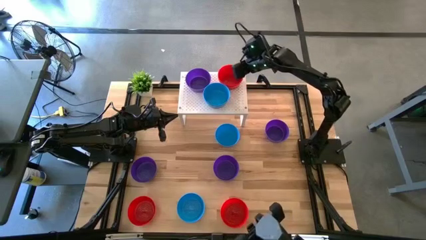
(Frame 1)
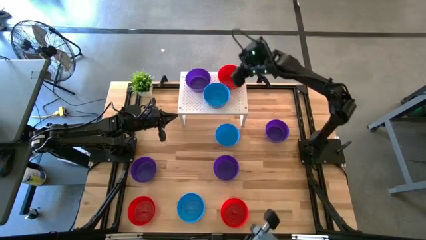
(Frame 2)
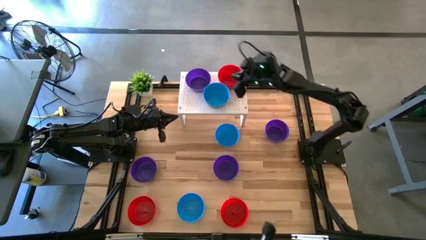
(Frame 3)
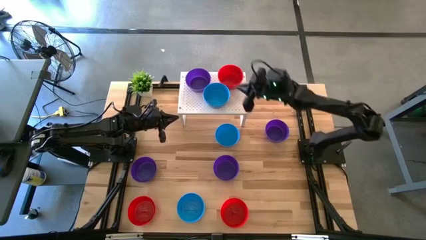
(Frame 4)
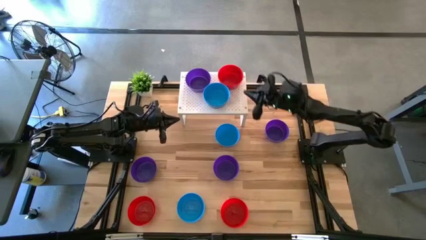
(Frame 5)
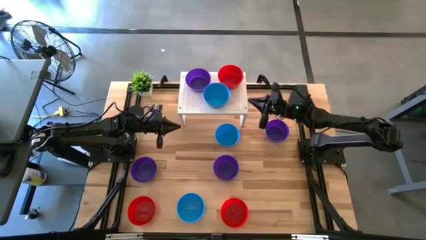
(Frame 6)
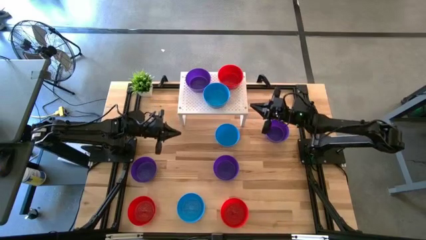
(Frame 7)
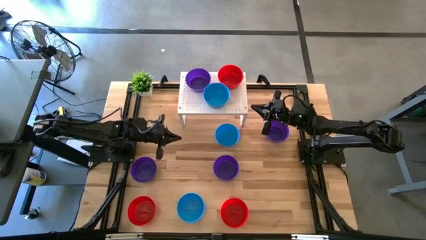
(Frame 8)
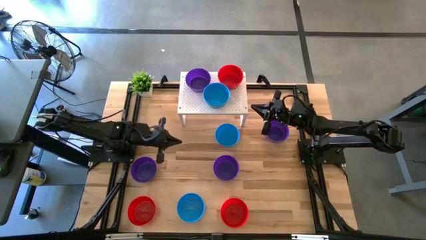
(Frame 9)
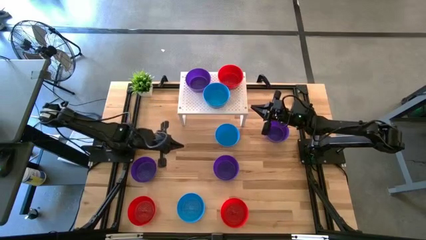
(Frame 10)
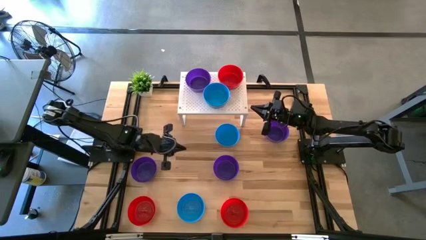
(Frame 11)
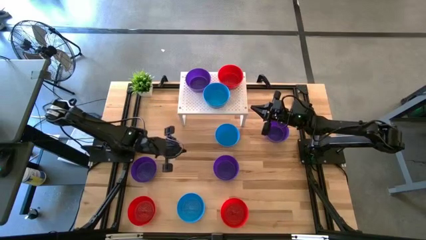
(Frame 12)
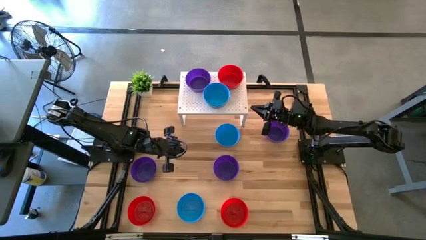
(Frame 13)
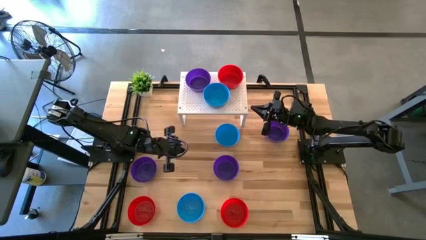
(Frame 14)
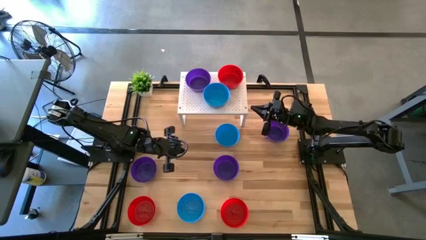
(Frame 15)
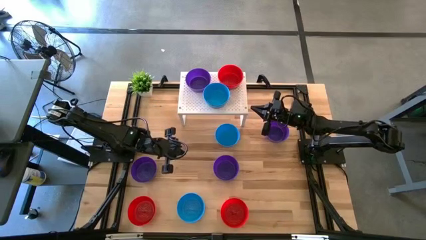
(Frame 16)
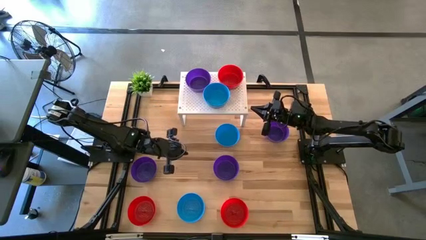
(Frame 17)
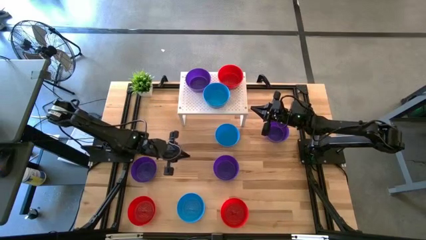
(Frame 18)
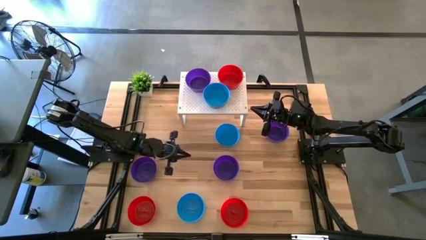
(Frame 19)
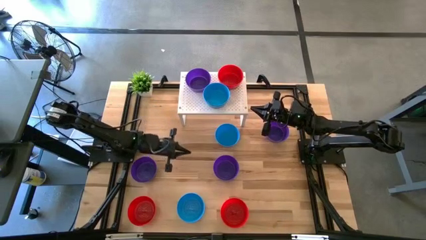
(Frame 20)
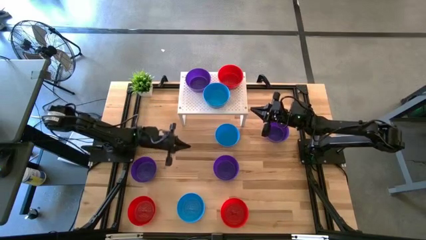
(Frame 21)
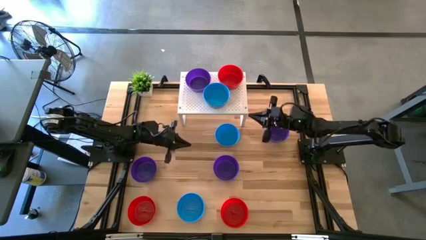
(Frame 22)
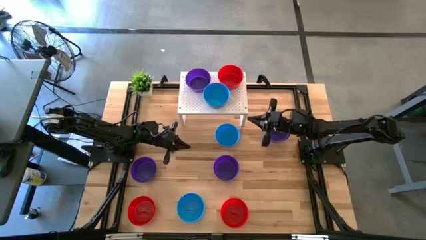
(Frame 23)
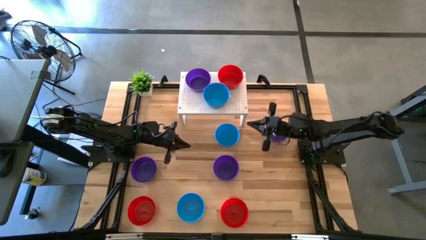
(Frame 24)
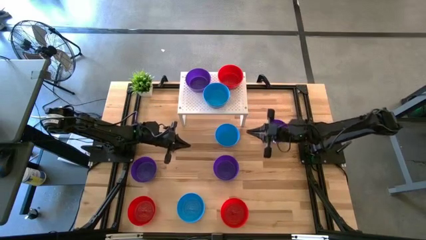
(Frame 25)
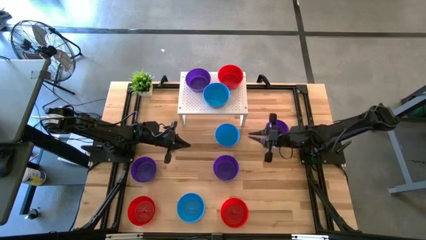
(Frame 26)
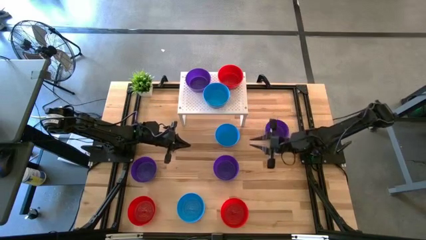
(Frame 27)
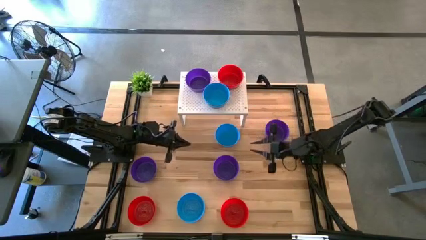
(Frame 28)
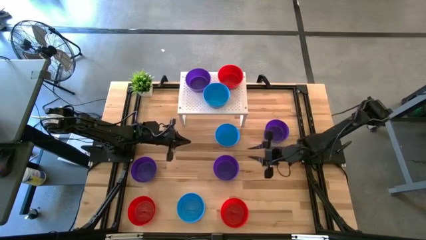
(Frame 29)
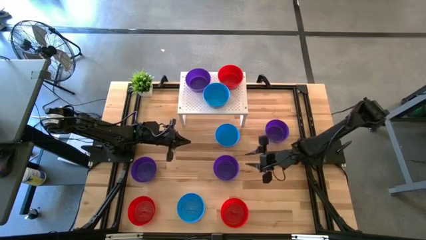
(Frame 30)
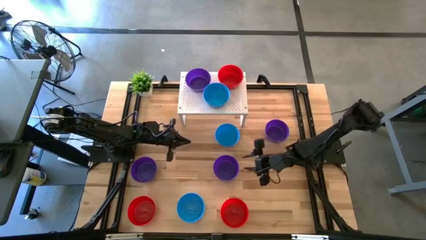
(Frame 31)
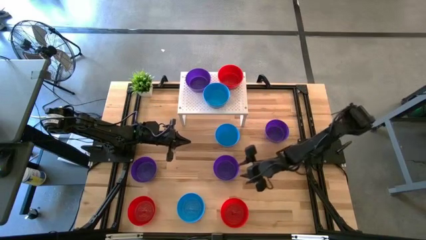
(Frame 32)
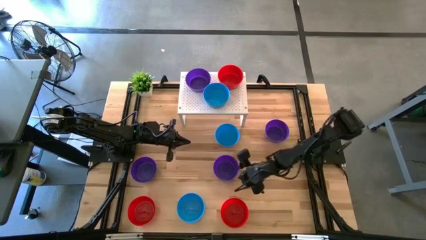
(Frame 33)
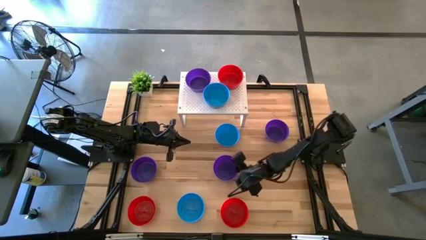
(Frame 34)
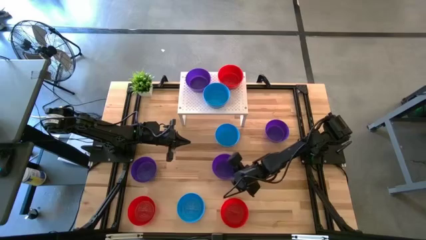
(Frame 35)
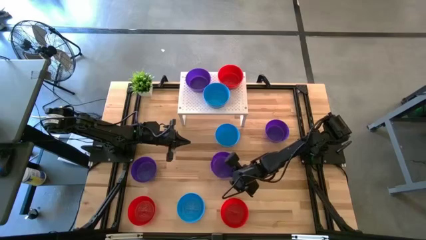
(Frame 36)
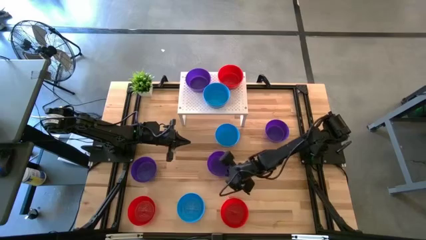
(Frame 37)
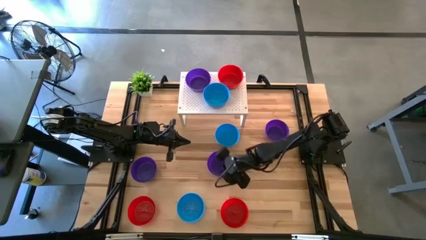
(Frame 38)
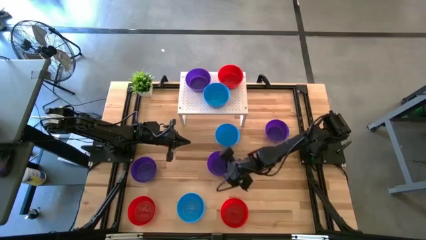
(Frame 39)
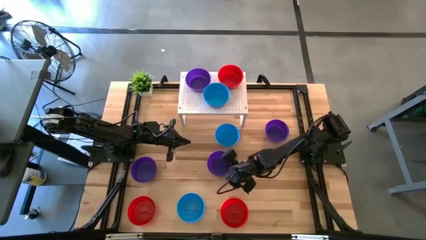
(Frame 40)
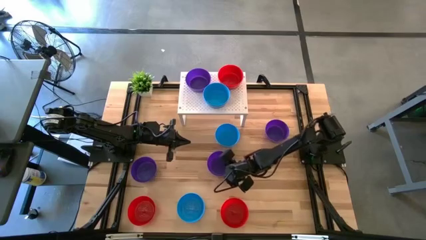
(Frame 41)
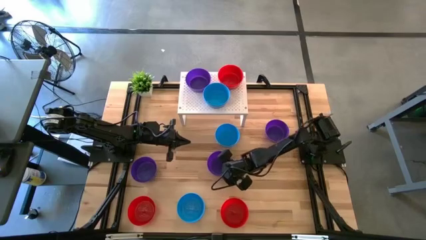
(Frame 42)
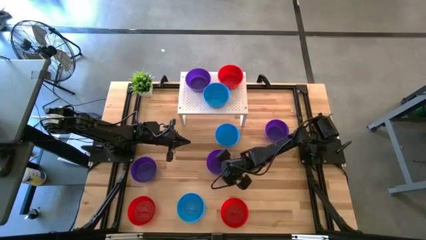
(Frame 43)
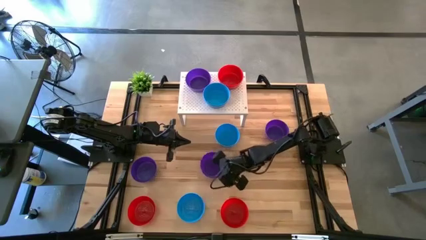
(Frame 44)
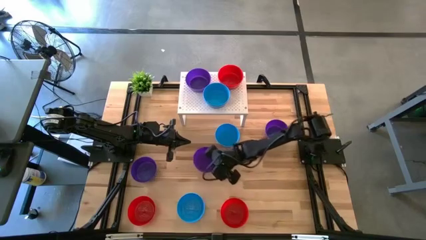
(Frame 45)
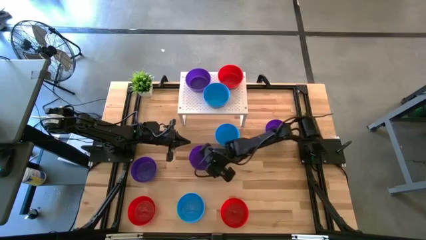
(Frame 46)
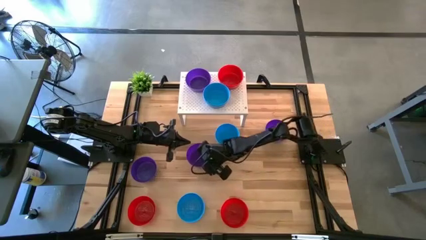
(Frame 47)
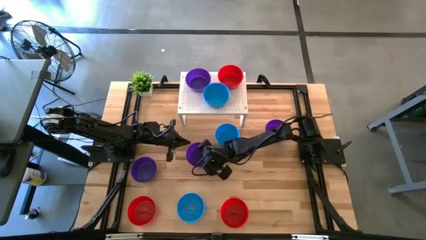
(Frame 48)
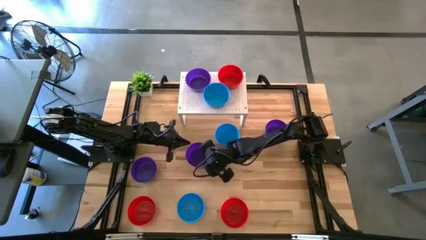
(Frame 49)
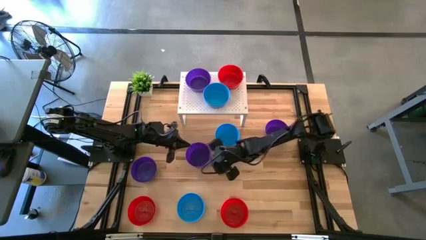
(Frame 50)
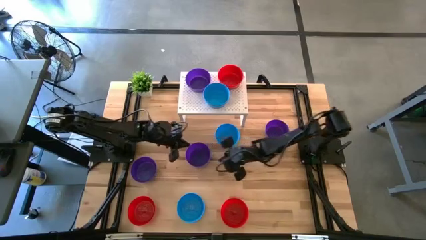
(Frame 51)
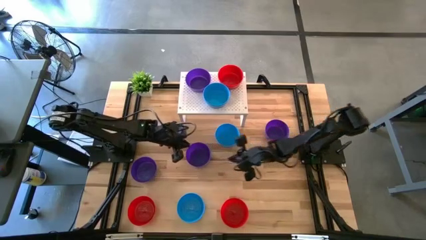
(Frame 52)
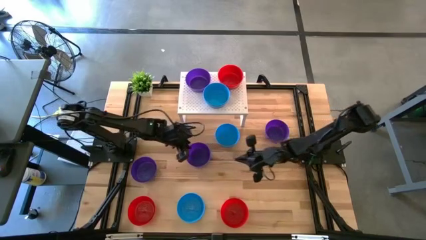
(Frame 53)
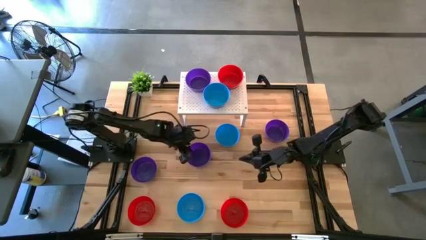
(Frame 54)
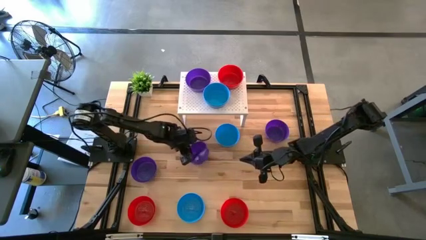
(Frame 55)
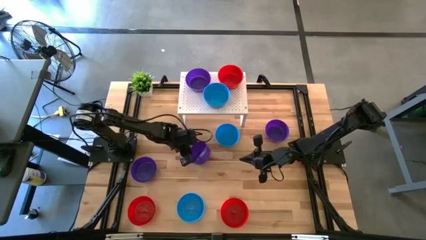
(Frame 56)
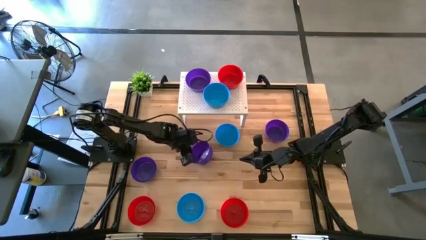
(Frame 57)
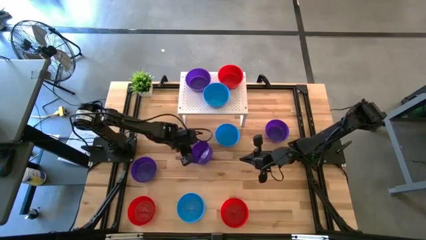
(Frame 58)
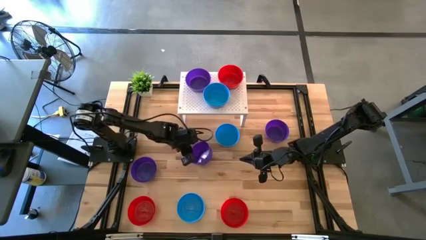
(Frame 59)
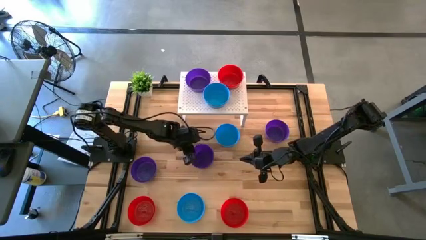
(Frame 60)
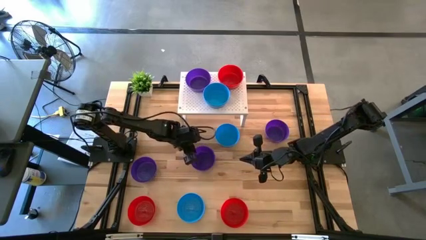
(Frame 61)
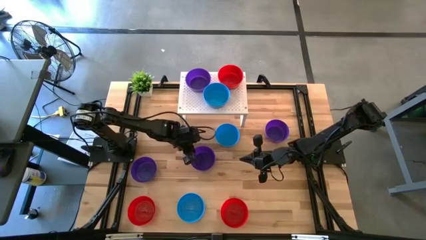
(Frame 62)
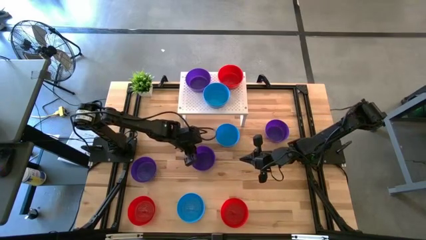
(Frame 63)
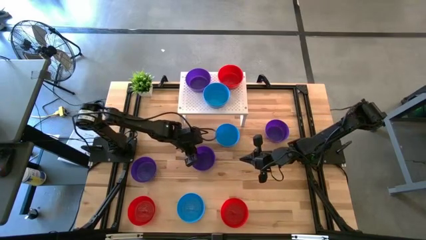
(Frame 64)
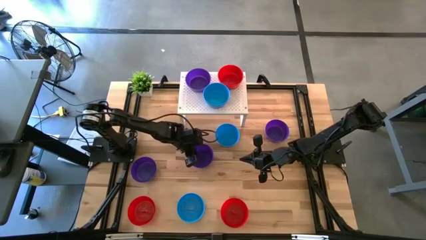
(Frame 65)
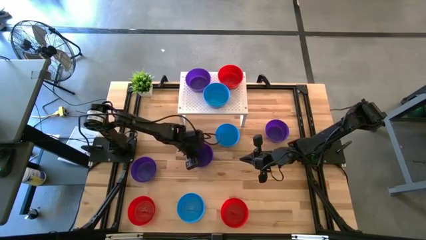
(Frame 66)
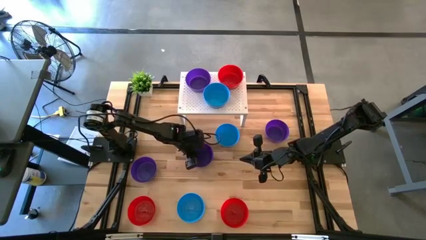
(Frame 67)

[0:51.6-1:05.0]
Task: Pick & Place Mini bowls
Stack the purple bowl on the purple bowl on the shelf

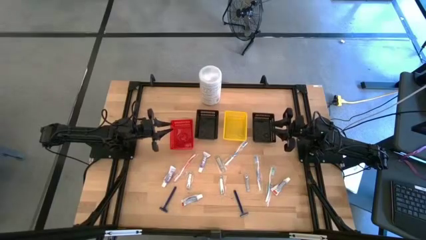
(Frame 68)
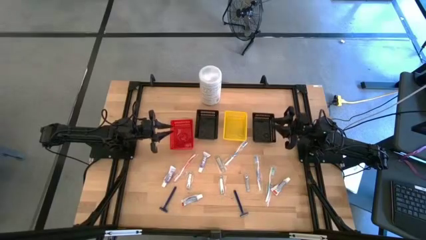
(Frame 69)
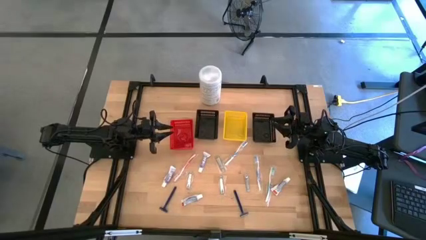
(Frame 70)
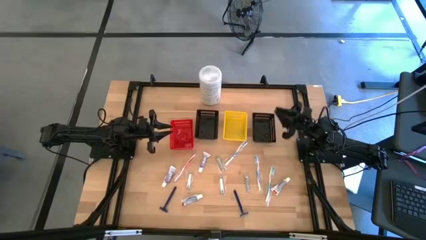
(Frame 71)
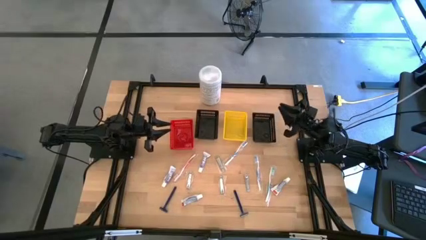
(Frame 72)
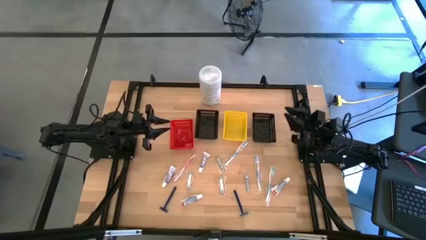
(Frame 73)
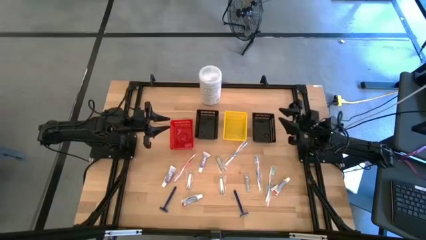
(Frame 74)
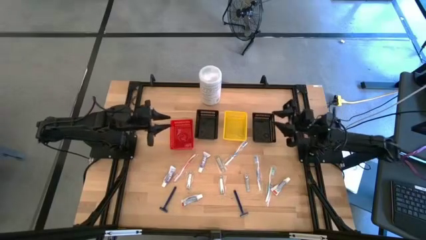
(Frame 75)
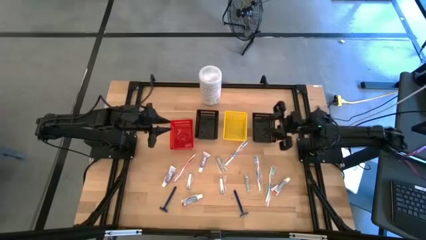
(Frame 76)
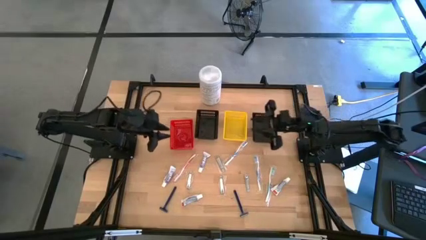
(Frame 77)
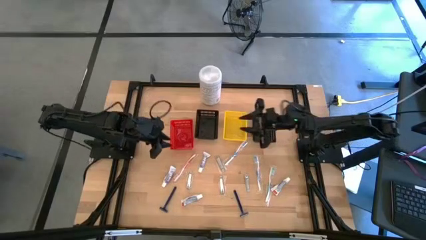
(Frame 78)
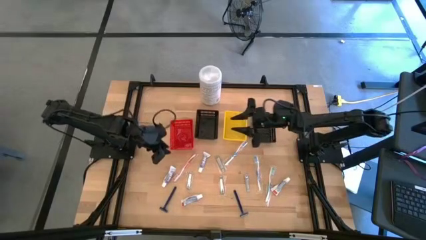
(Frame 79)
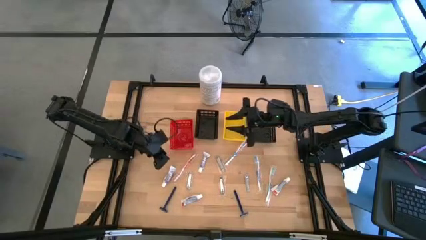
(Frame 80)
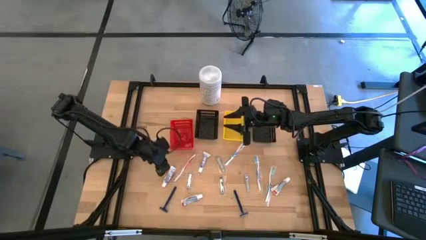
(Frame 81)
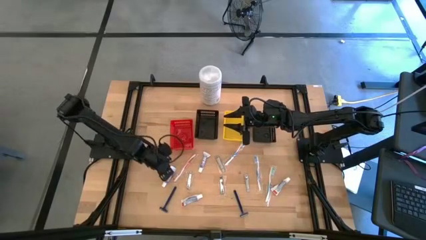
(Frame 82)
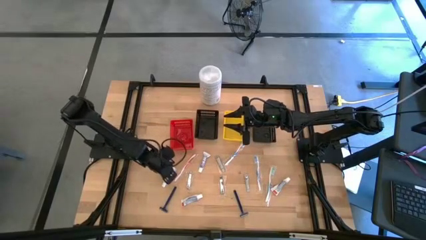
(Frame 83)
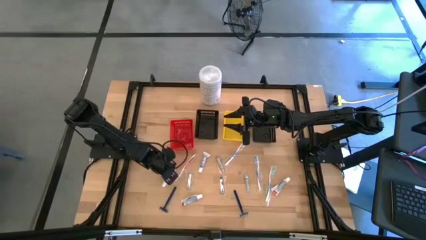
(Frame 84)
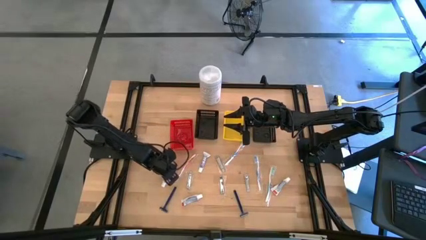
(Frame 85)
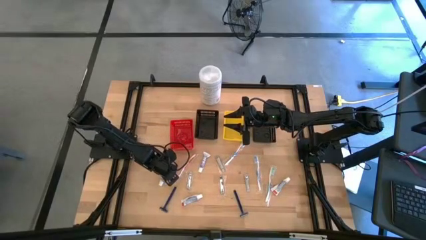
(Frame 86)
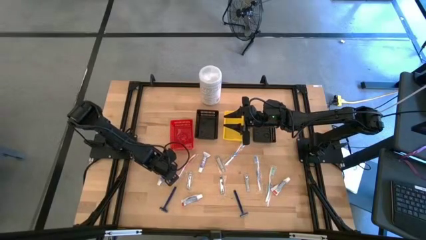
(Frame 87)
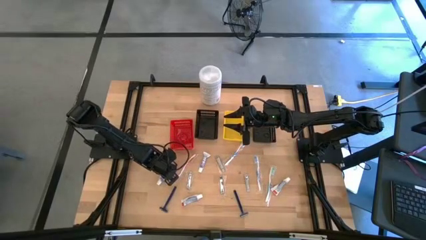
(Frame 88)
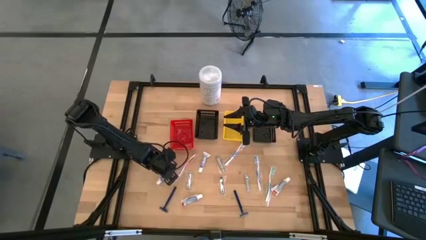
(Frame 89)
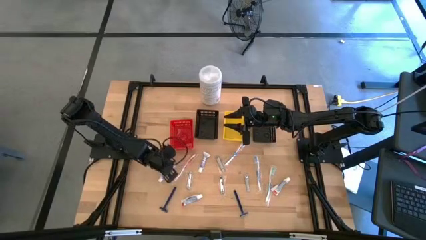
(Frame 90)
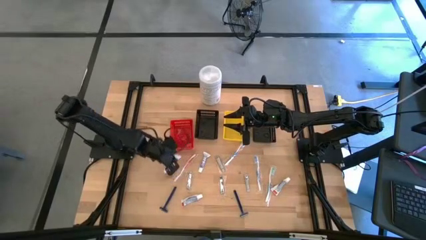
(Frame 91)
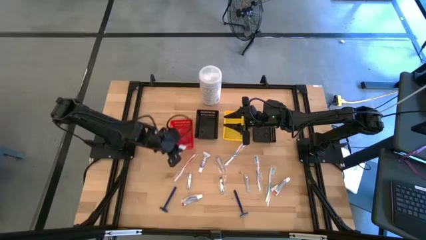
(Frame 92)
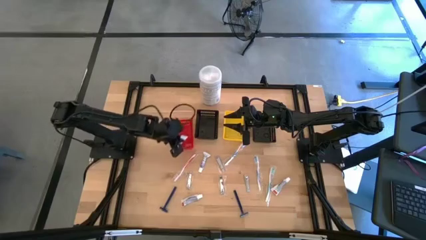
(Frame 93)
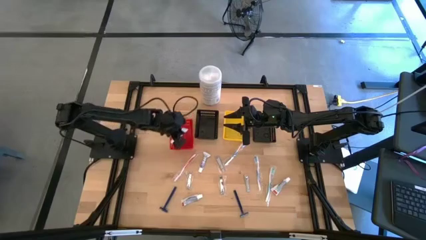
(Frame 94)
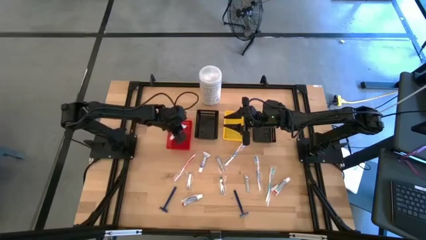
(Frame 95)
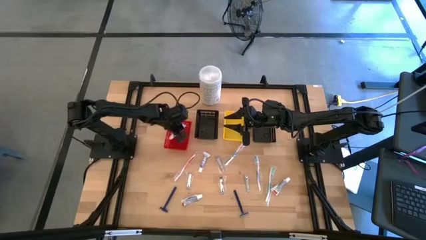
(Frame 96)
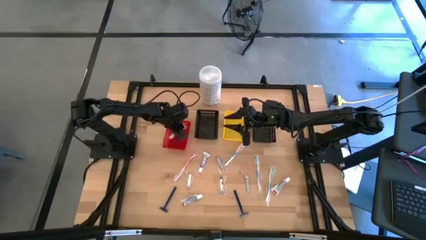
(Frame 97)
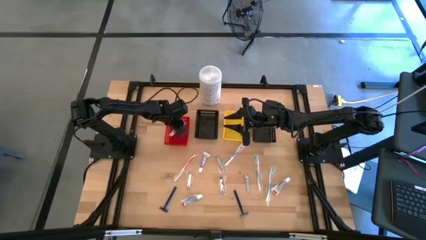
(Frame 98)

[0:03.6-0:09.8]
Task: Pick & Place Travel size toiletries
Put the toothpaste into the red basket
